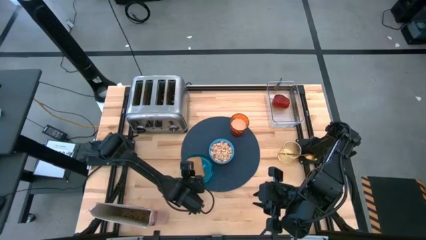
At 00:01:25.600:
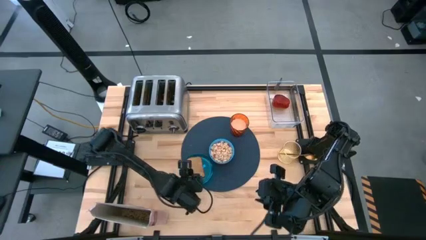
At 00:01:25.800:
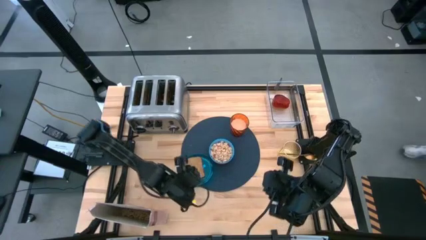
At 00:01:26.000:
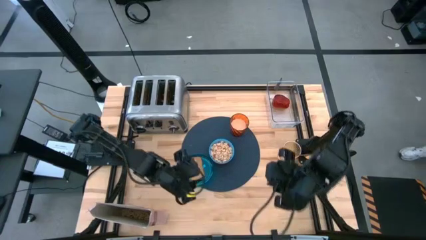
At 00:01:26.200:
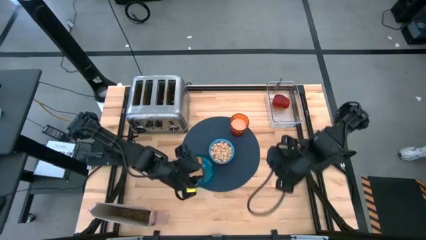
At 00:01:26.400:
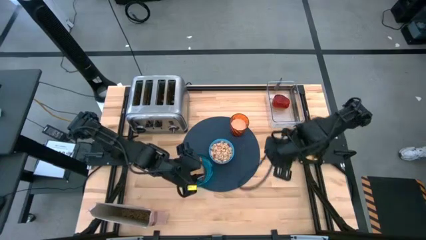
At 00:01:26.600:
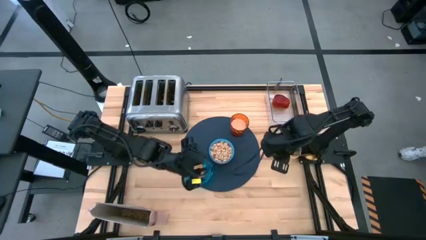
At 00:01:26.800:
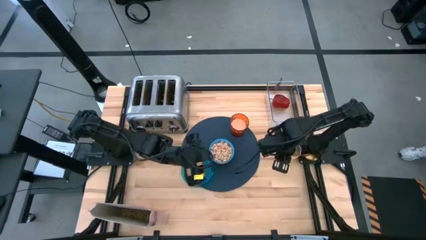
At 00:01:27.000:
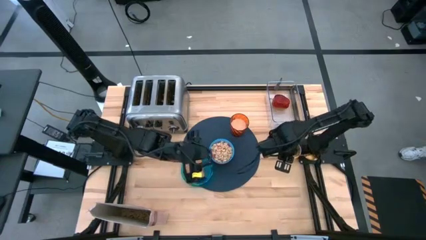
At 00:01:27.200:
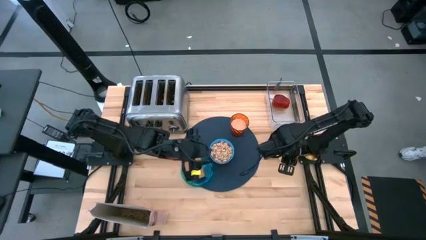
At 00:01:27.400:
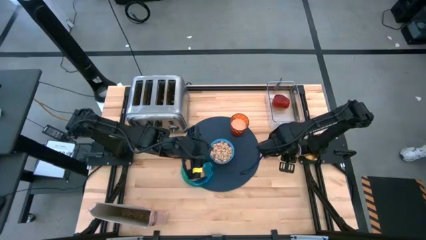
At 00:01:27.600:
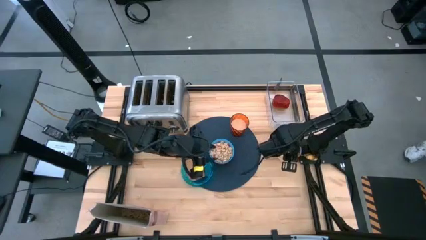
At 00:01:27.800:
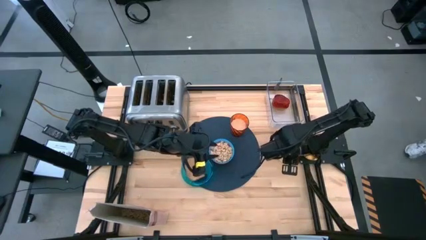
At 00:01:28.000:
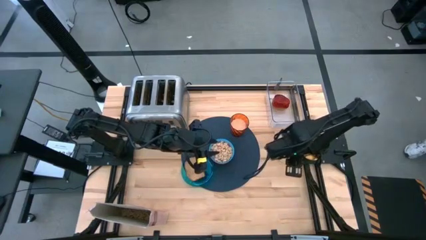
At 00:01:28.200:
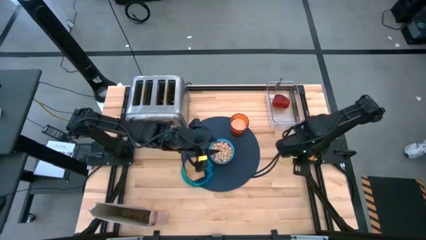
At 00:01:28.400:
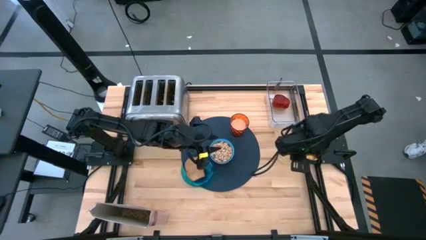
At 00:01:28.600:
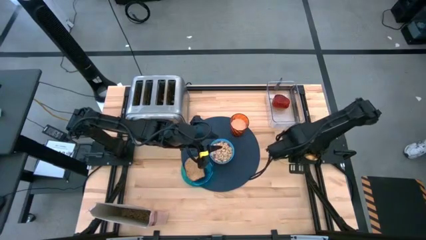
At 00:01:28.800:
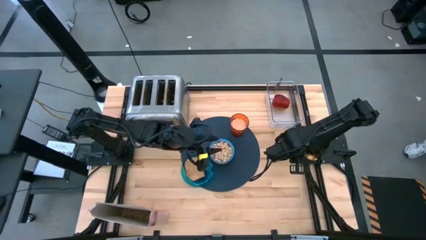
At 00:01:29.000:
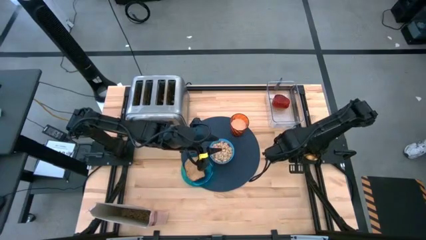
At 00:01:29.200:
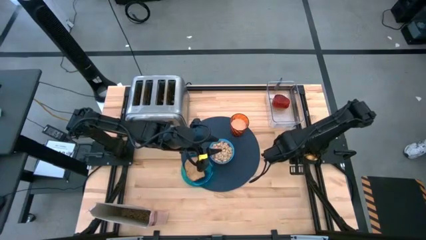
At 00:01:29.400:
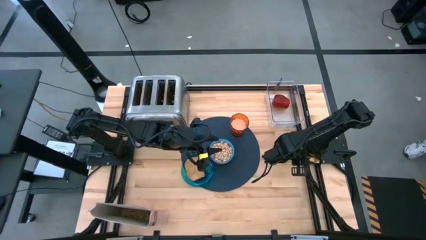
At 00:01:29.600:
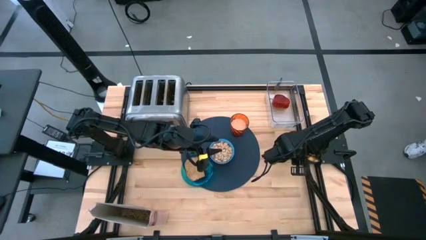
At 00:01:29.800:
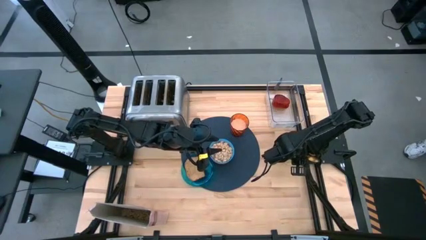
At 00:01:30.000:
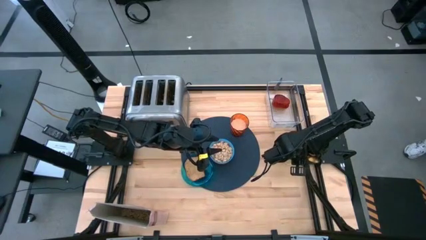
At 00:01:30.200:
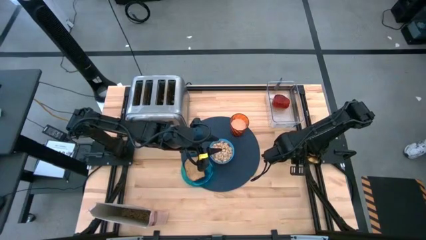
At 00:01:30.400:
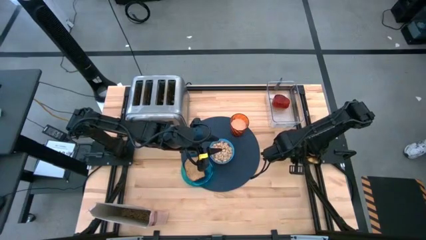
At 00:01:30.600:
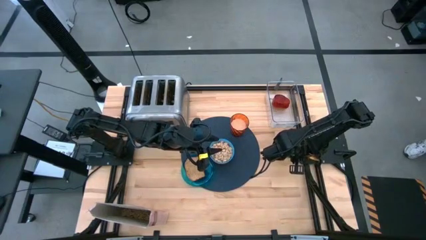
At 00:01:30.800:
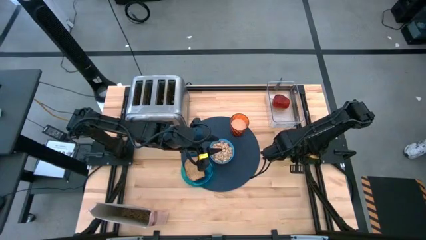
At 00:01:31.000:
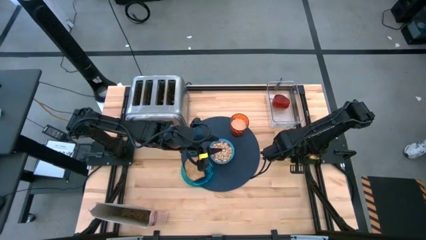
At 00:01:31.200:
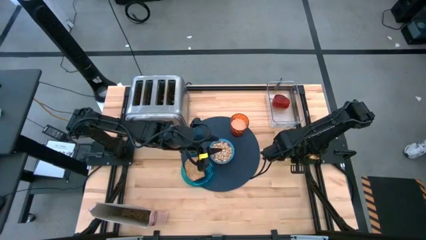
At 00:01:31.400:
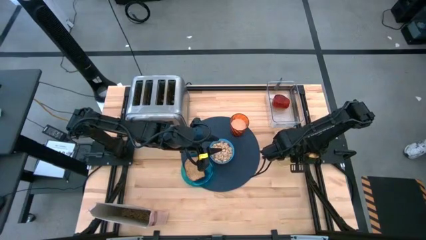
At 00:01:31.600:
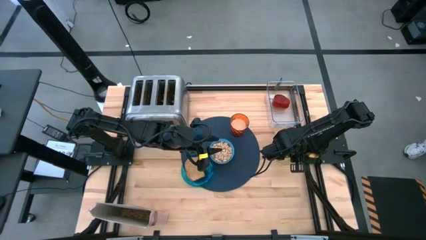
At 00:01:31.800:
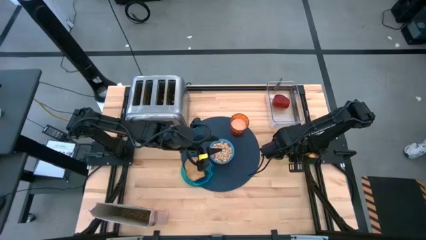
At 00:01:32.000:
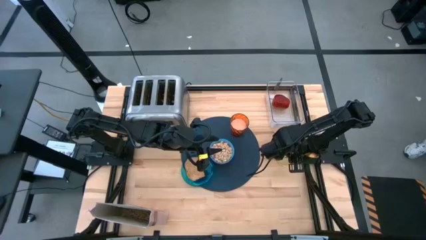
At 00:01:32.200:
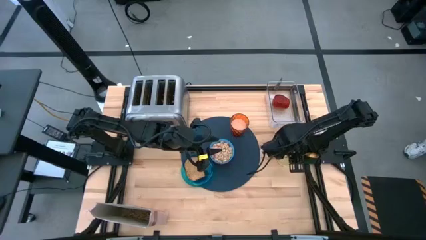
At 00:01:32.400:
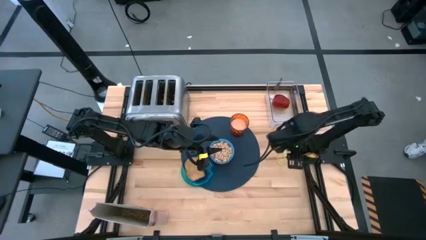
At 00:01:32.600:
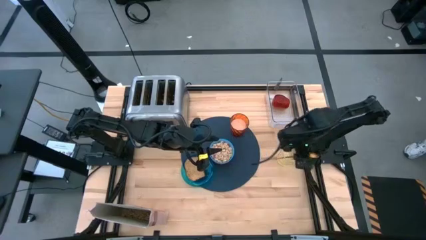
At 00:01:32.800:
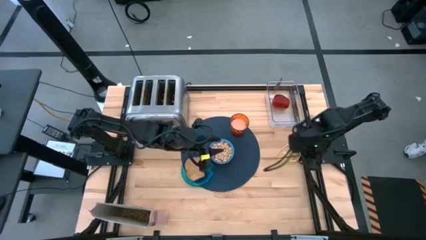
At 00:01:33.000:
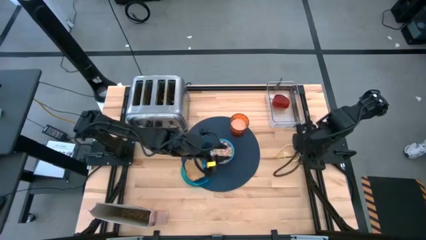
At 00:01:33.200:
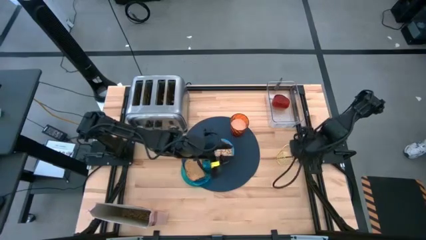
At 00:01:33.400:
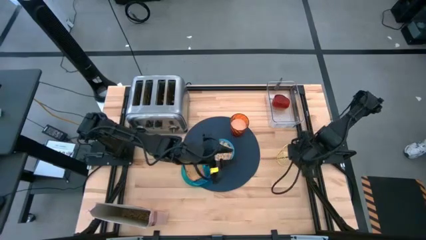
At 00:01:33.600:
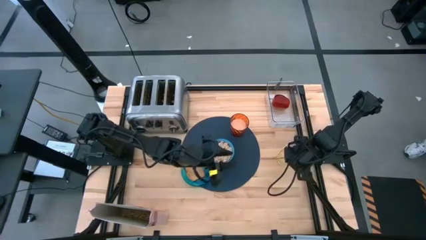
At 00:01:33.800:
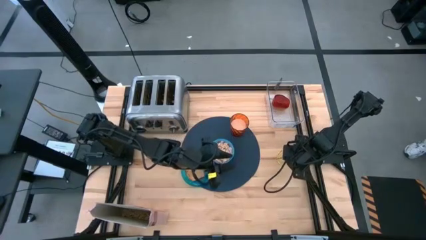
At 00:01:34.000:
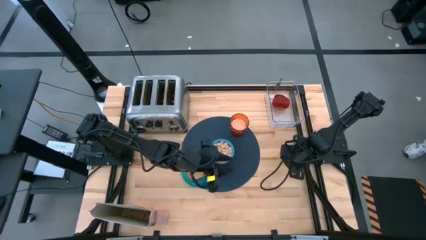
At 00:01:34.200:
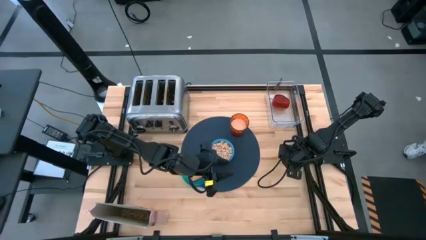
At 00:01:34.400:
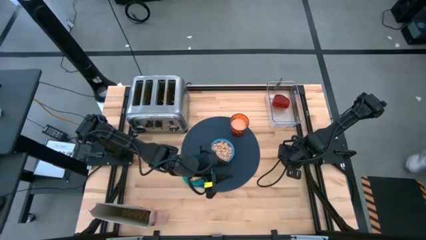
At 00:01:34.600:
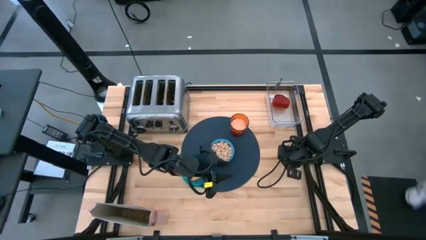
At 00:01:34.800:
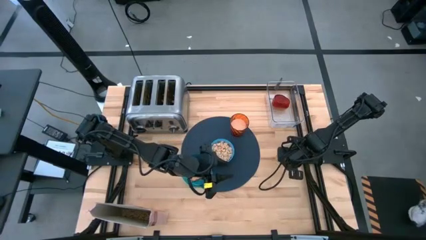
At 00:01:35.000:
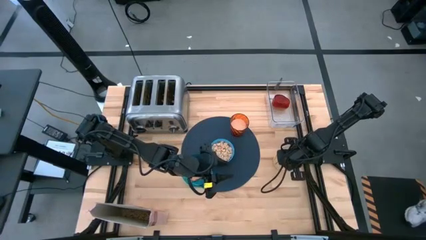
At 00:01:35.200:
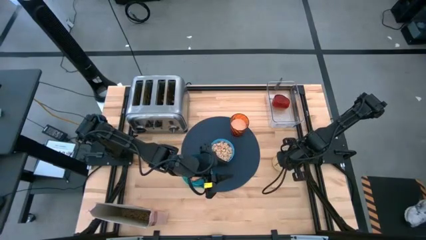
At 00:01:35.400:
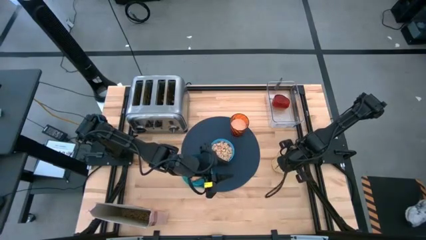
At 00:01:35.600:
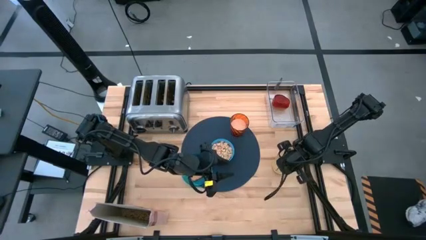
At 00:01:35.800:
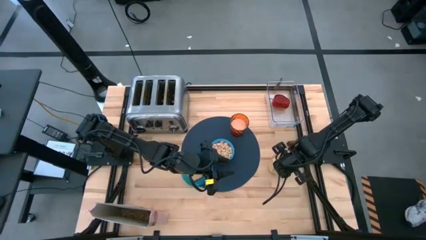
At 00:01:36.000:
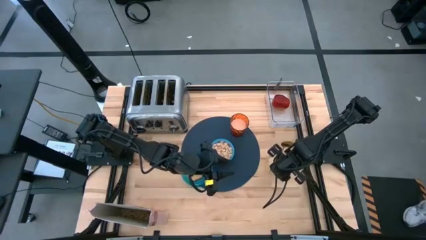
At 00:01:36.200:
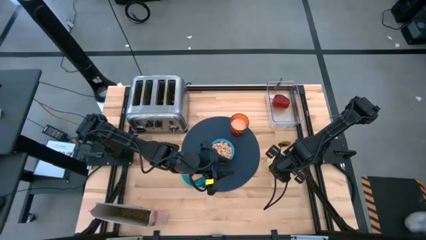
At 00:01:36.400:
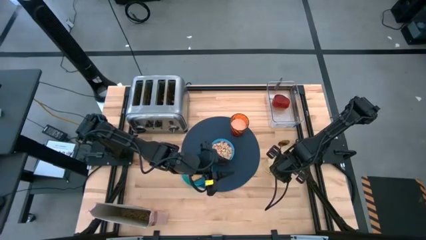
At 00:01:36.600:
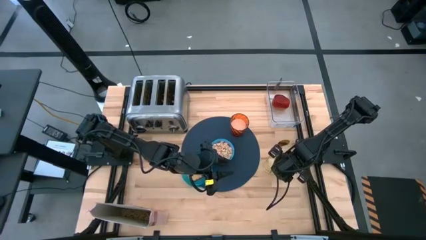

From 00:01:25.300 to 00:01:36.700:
Task: Arrange a breakfast setting
Adjust the gold cup on the table

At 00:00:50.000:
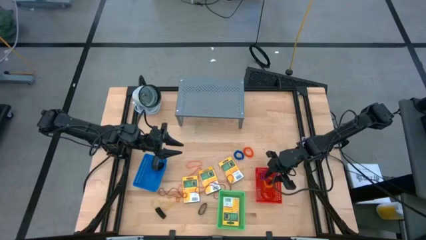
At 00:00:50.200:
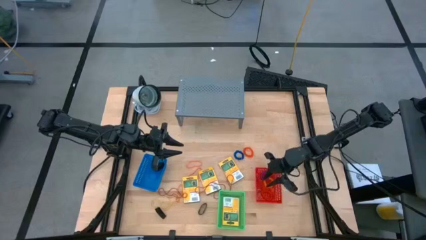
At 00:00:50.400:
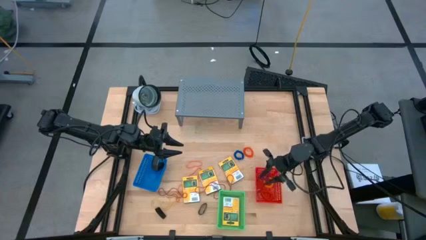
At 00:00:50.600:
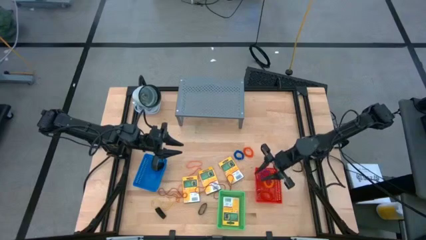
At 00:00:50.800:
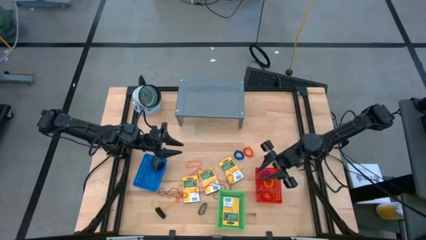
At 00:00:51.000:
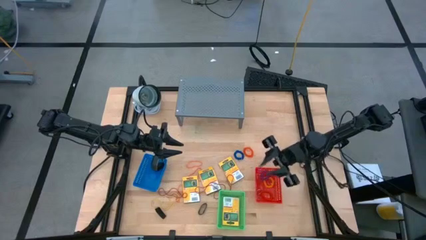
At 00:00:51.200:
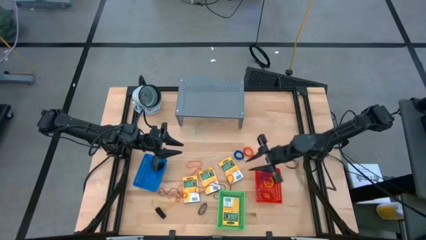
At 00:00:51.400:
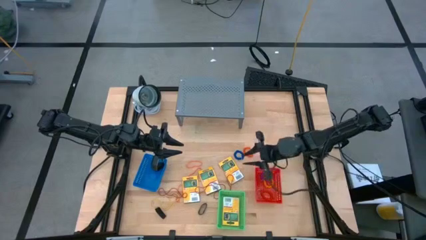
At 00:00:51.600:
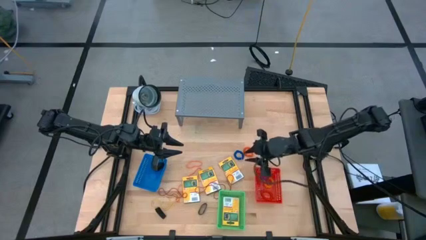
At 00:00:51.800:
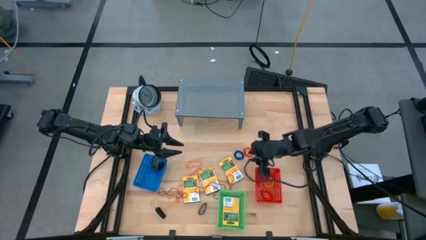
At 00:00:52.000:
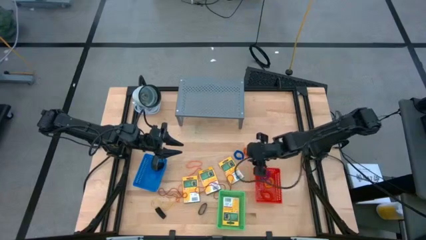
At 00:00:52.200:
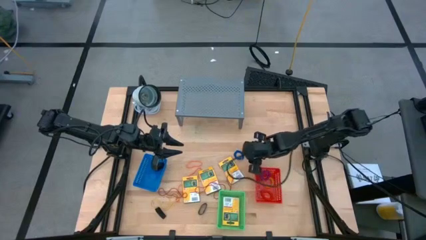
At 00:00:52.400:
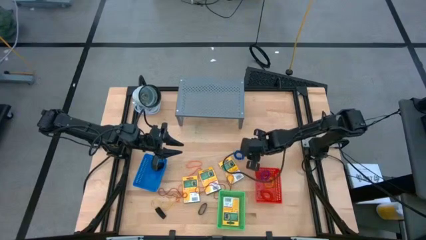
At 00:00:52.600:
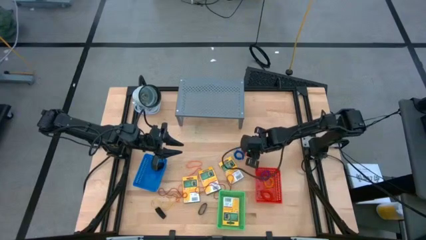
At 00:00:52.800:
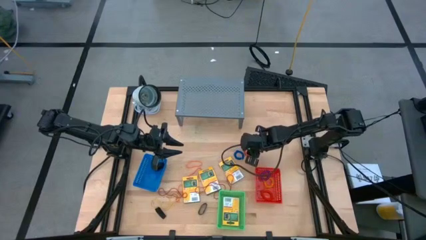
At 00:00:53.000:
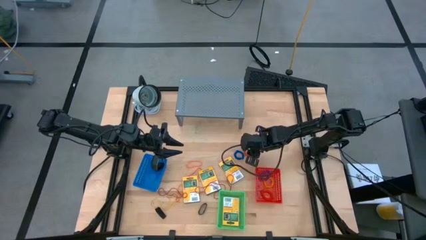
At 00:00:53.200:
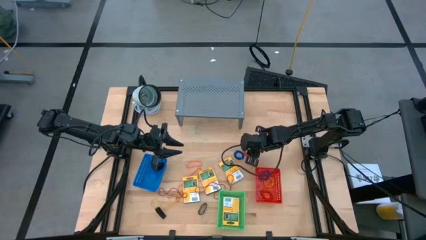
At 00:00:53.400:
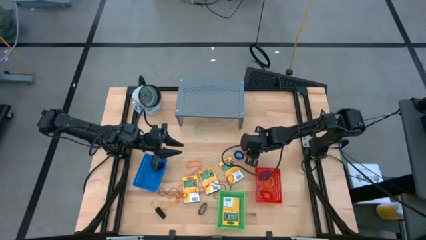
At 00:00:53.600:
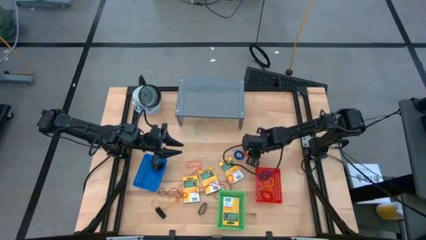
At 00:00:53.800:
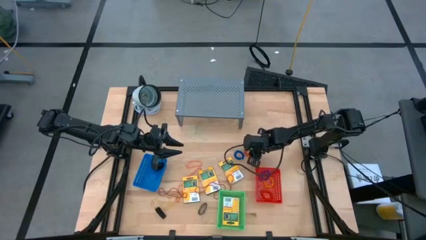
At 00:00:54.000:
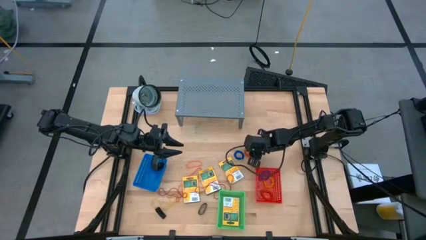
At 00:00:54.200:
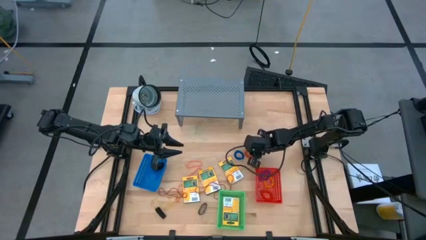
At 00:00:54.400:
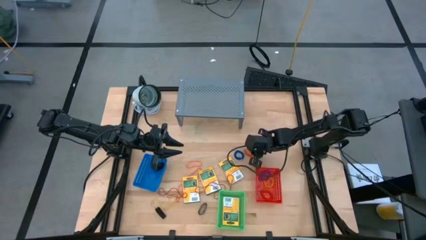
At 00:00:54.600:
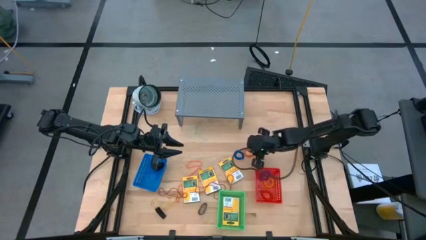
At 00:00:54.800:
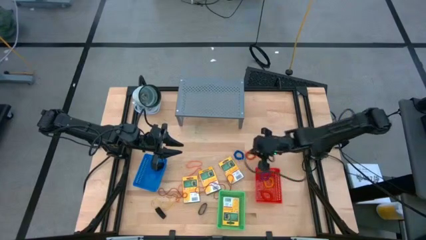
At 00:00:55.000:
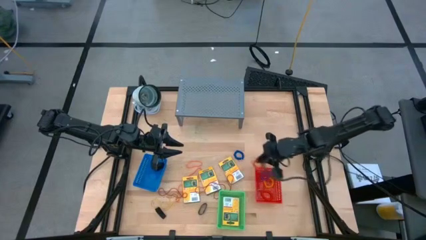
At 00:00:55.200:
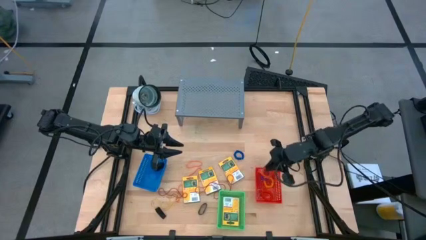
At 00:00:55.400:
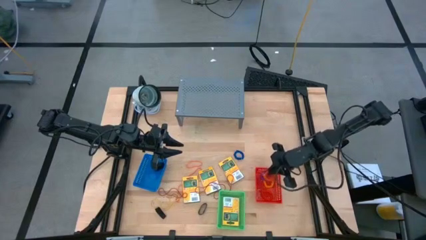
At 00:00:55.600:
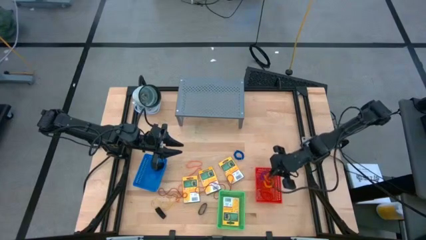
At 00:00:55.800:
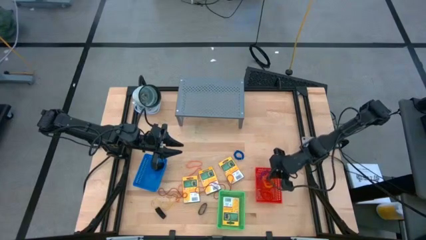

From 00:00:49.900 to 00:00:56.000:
Task: Pick & Place Office Desk Supplies
Put the orange spring keychain into the red bin
